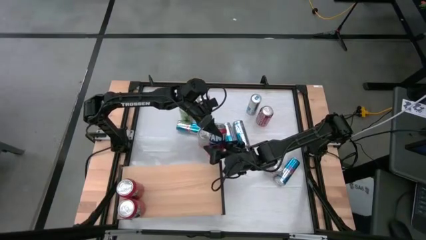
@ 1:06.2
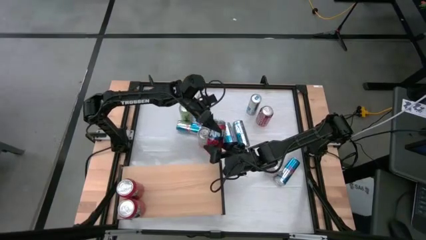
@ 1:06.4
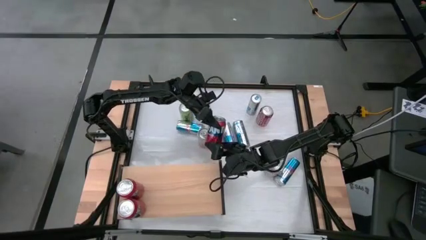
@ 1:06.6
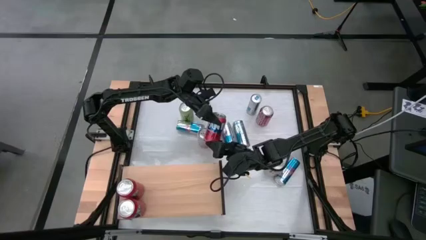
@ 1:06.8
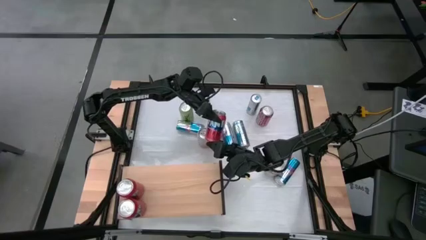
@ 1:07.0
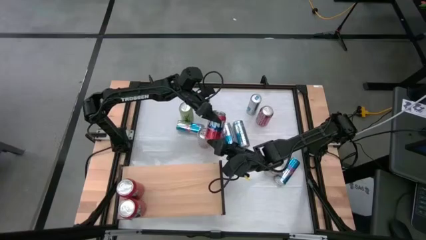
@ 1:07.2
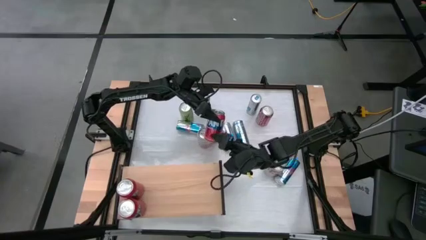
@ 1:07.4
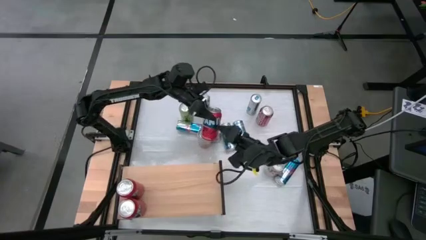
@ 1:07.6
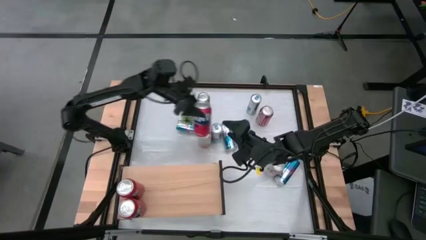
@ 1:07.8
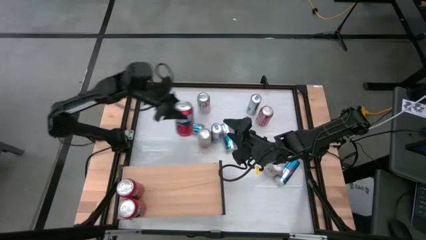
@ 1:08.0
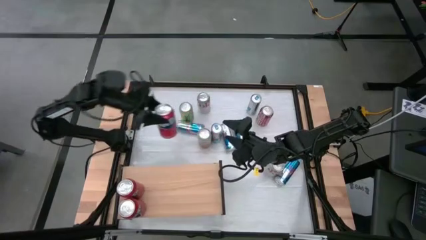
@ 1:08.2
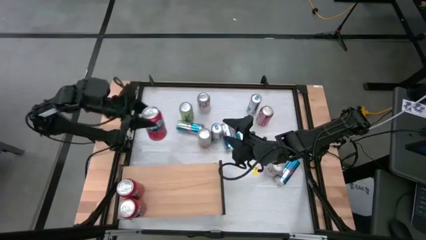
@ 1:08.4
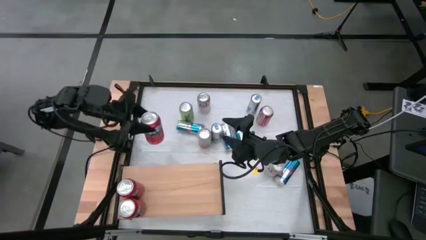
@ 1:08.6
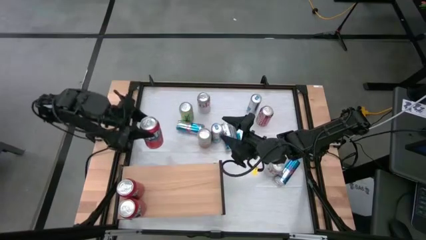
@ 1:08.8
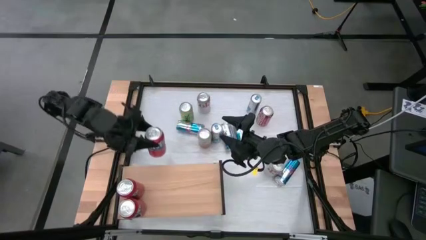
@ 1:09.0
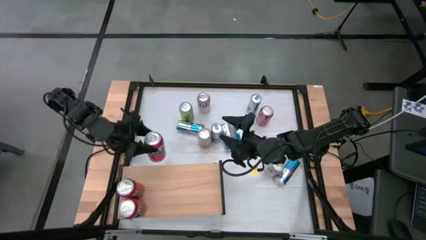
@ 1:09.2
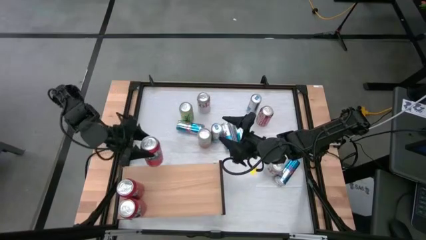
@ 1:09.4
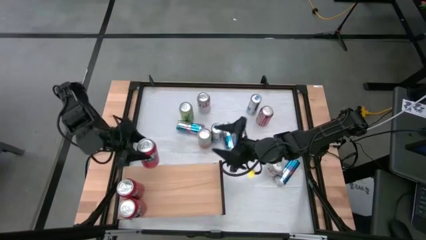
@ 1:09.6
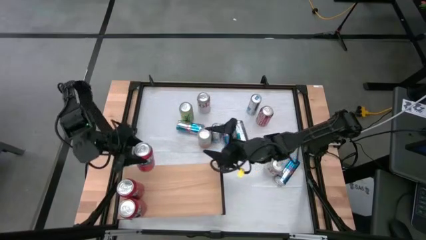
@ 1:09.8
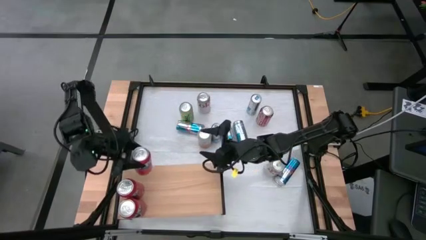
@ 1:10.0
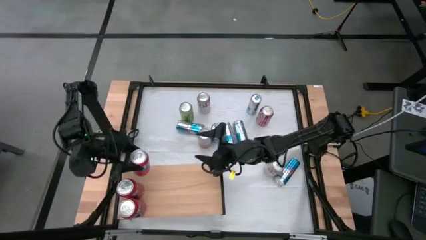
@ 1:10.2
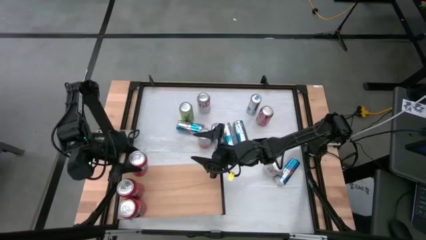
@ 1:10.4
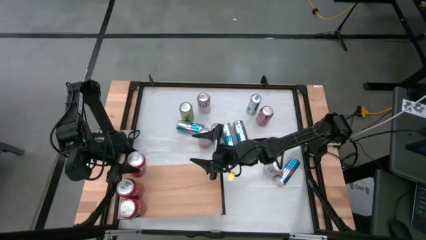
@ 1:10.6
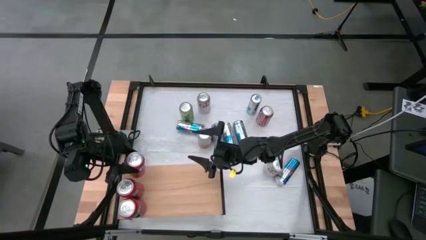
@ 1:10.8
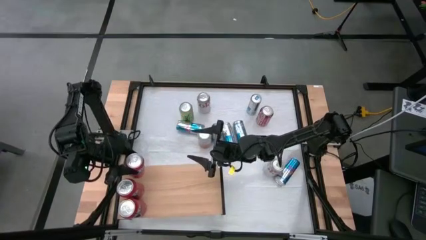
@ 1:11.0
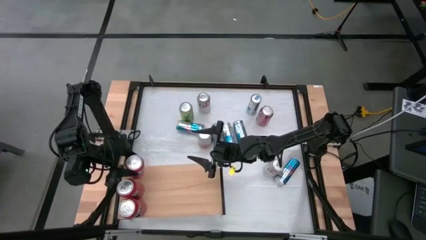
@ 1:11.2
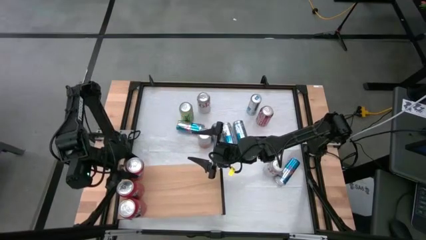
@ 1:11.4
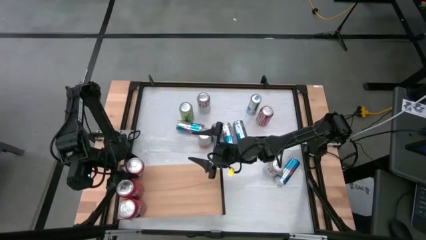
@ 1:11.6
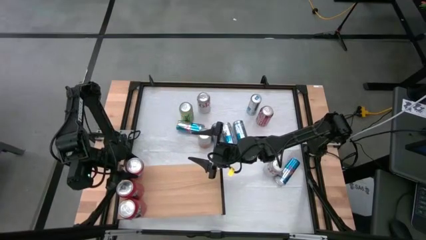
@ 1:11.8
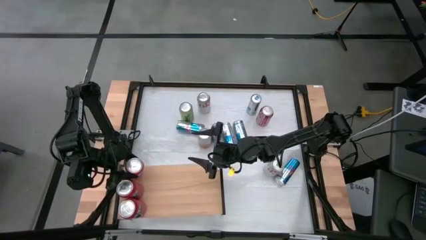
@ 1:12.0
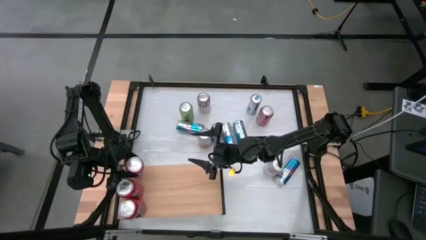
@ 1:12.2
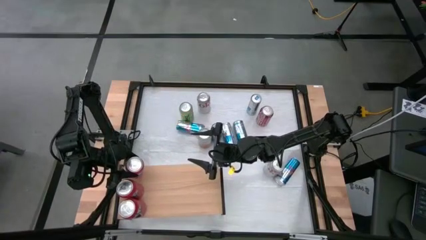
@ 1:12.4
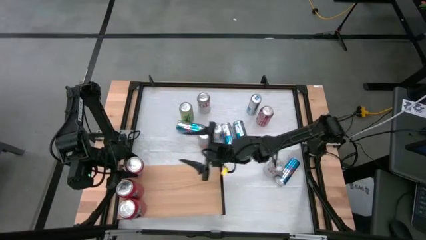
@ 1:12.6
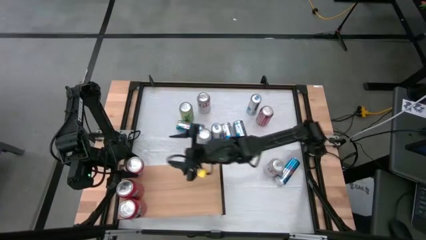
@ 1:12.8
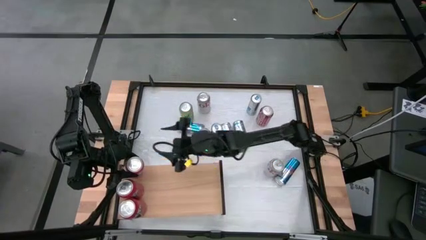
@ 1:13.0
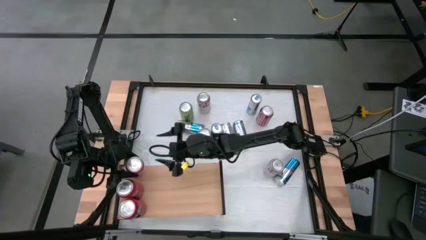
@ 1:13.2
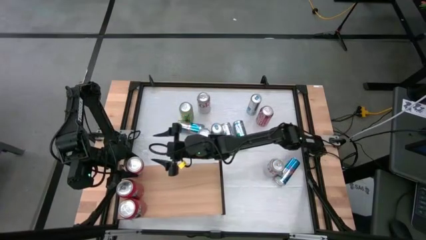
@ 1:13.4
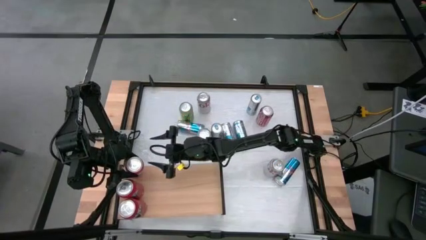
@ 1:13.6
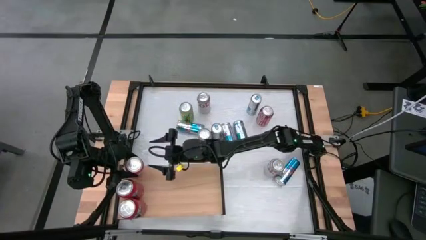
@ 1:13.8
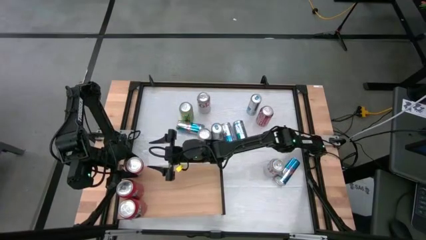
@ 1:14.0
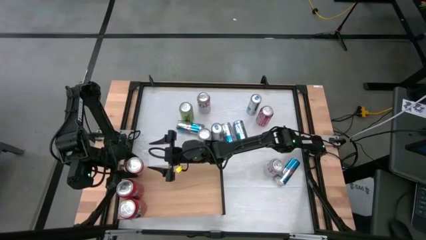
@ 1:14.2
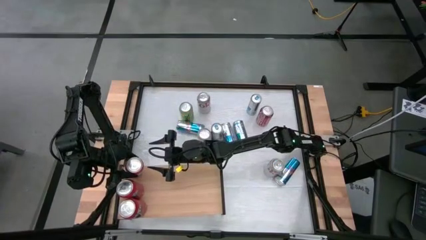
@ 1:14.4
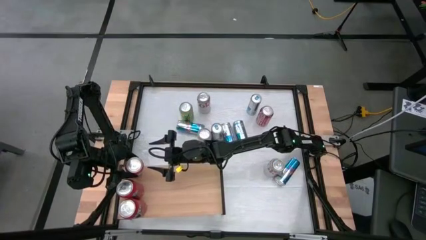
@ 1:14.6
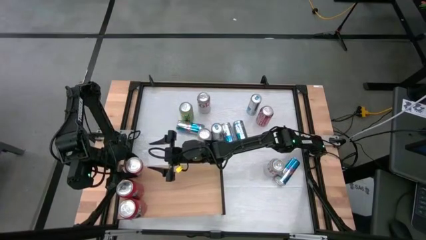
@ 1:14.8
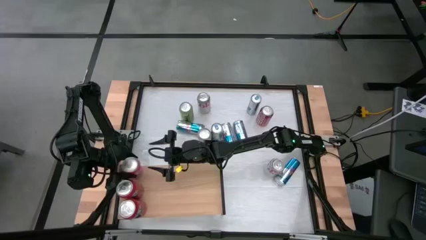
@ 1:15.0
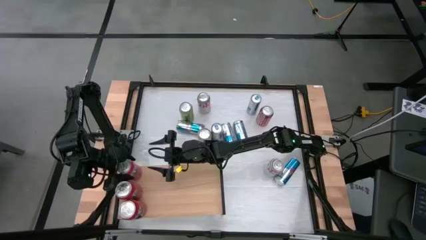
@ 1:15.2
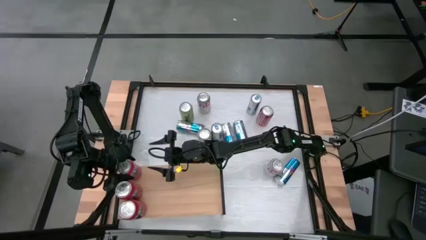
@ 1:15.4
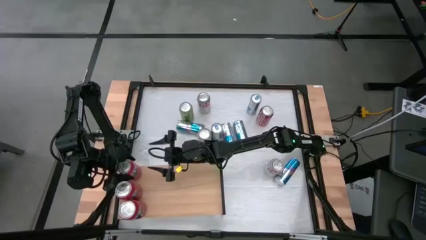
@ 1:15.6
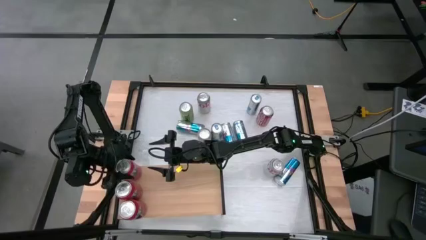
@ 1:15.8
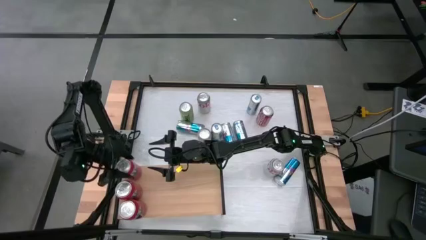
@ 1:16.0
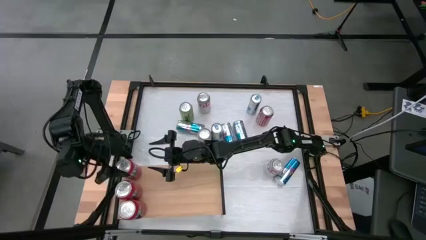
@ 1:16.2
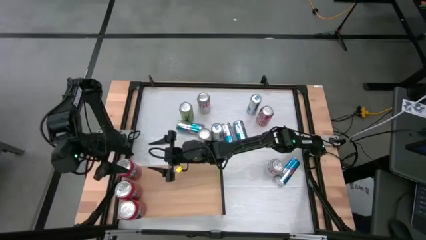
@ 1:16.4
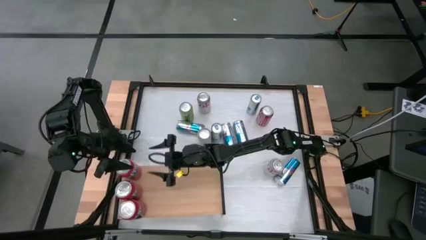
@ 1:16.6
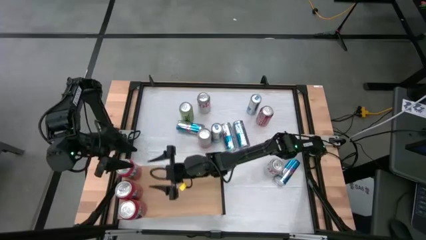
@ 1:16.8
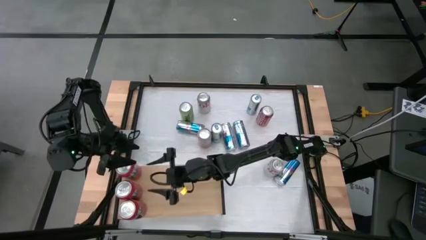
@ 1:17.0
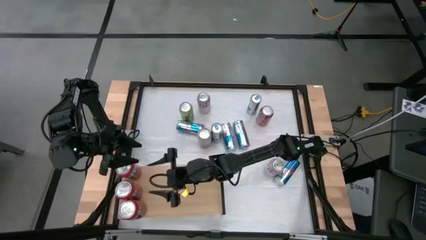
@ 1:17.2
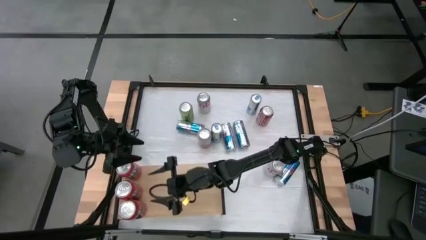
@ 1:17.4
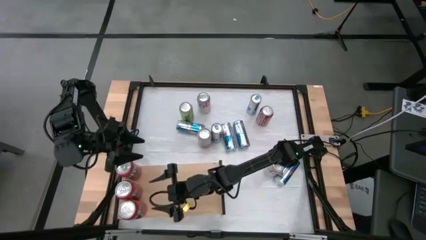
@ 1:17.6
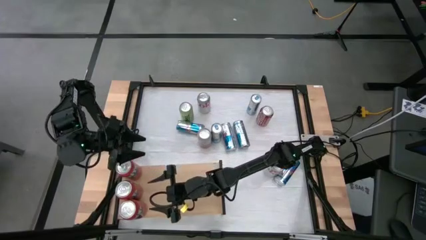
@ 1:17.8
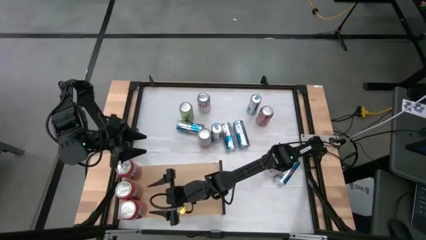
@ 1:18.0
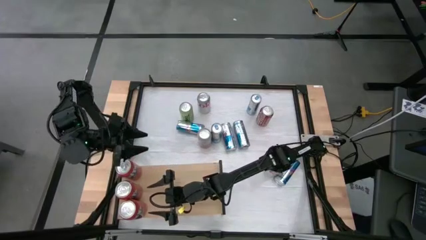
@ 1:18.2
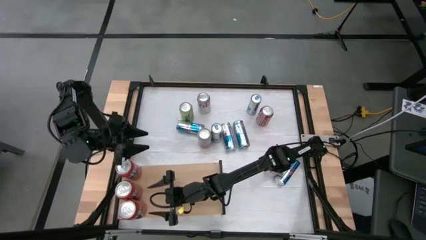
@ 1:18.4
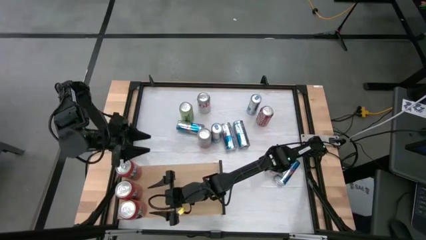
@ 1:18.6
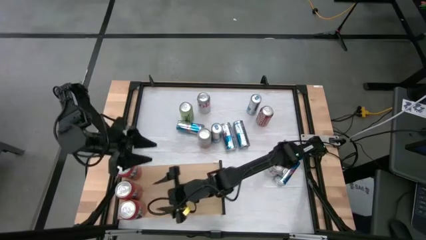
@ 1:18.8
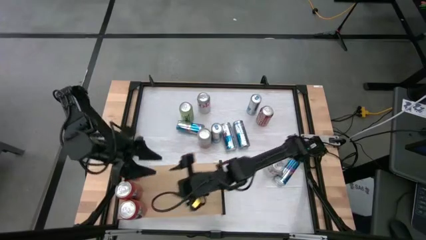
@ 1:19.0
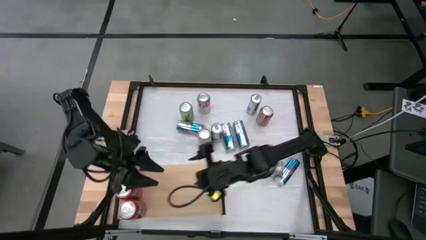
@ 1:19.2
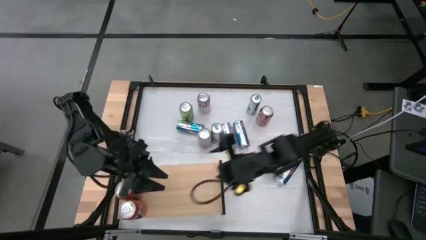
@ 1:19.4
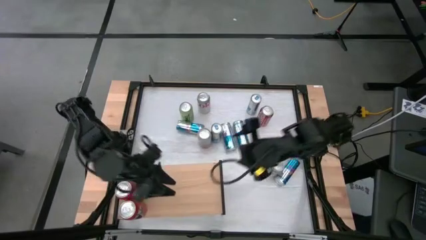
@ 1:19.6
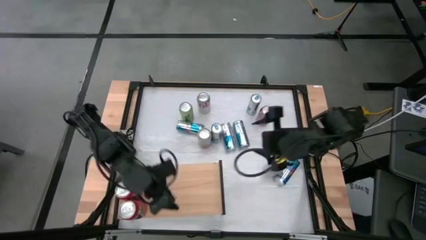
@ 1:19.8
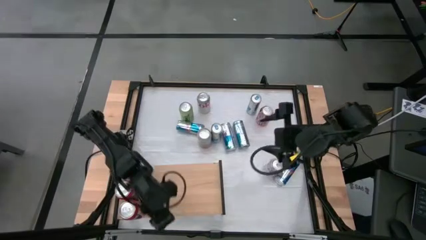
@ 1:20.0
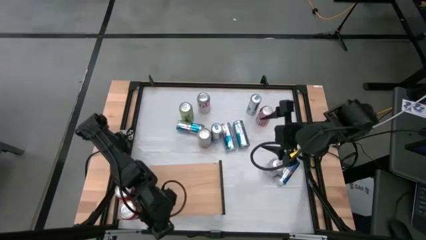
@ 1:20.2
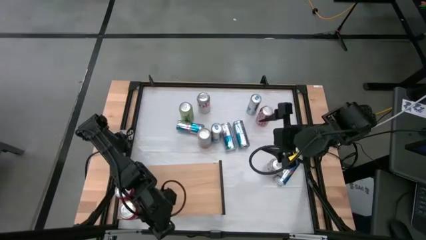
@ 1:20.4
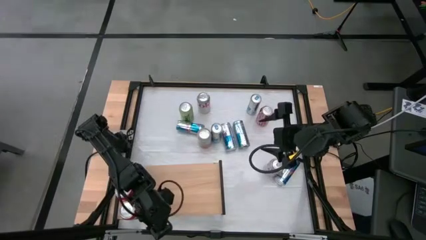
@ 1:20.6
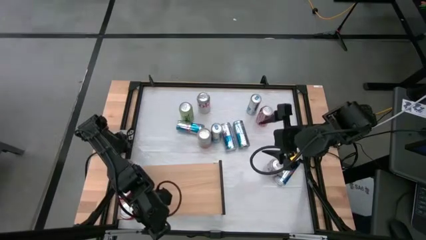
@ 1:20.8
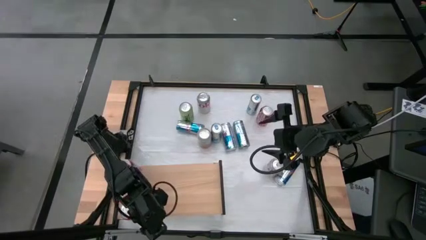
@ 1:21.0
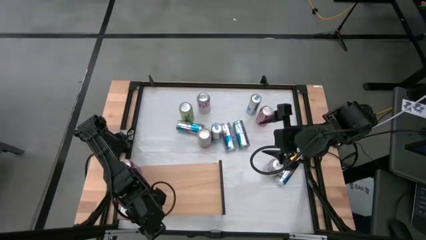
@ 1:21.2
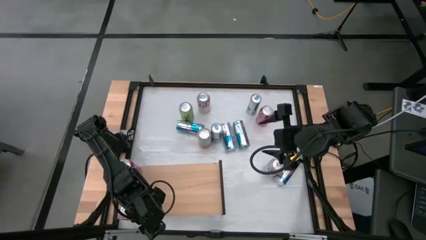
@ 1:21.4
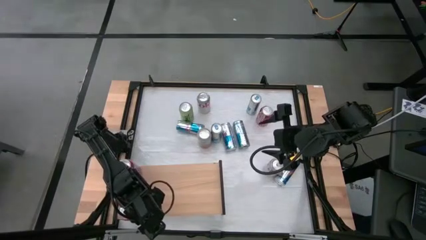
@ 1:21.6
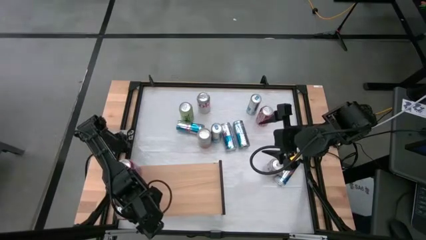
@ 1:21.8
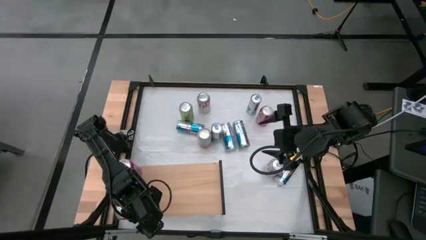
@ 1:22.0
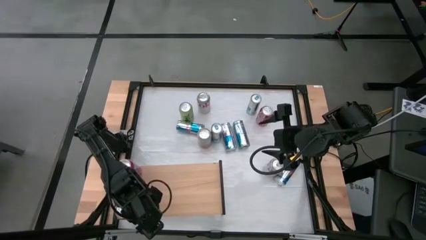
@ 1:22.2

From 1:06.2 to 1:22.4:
Task: Place canned beverage on shelf
Put the orange soda can on the shelf aligned with the orange soda cans
